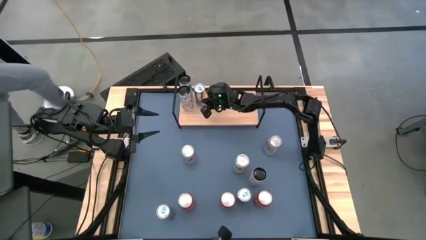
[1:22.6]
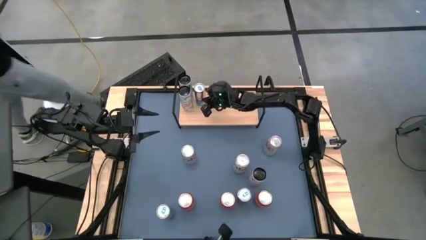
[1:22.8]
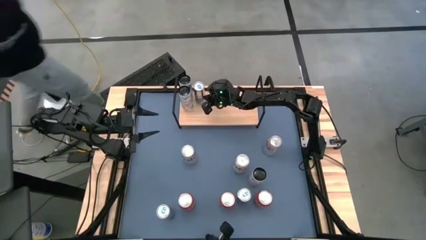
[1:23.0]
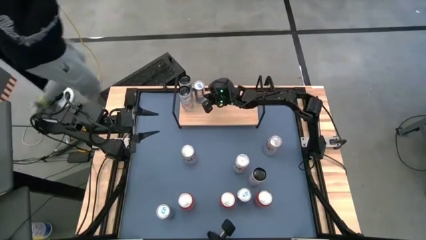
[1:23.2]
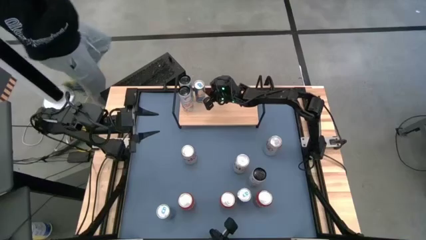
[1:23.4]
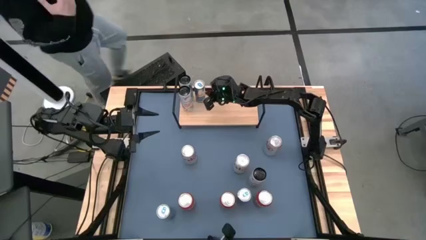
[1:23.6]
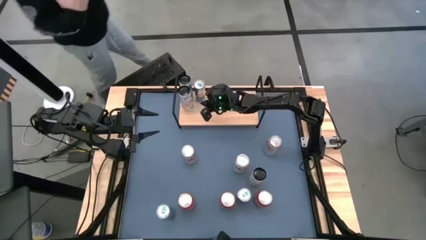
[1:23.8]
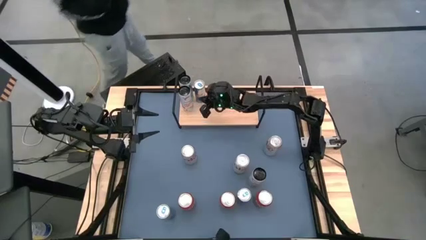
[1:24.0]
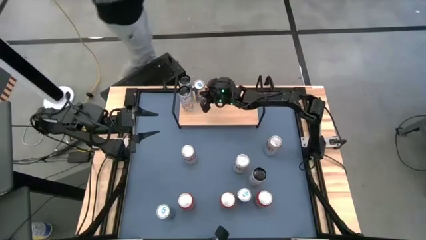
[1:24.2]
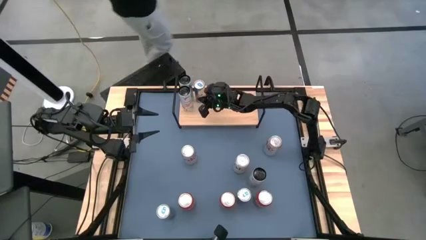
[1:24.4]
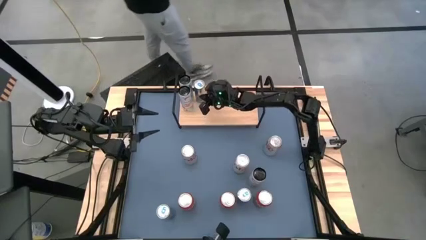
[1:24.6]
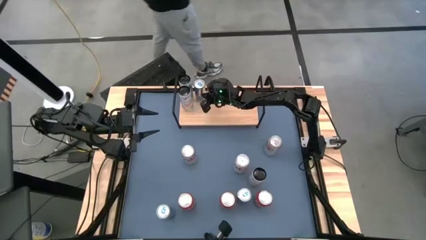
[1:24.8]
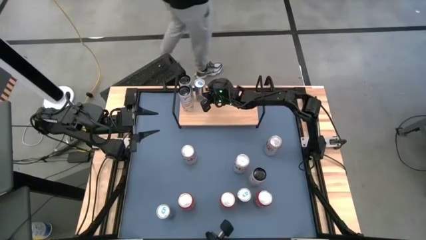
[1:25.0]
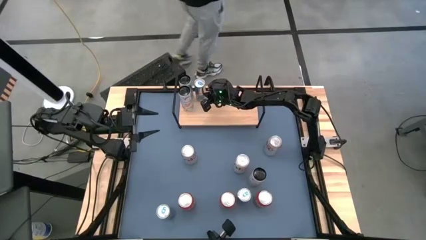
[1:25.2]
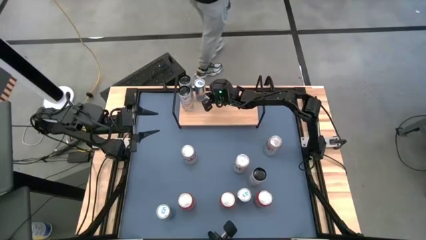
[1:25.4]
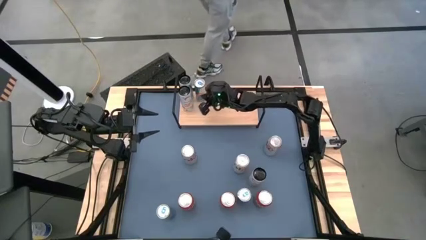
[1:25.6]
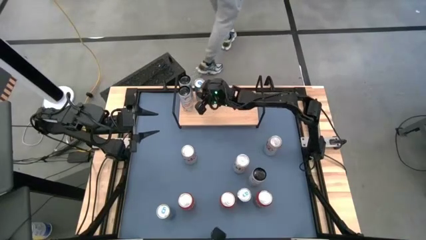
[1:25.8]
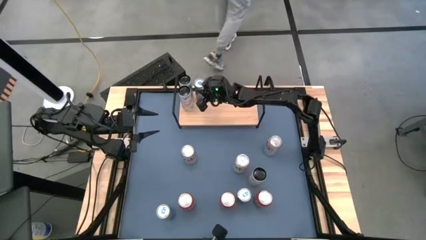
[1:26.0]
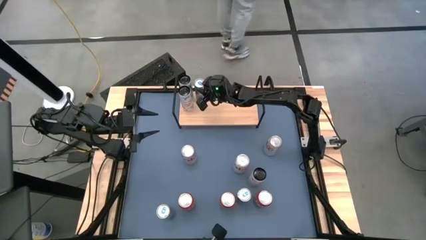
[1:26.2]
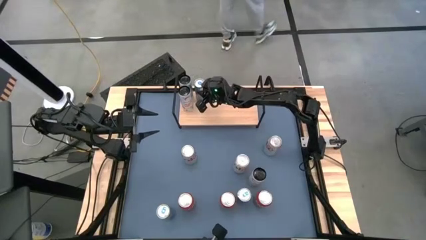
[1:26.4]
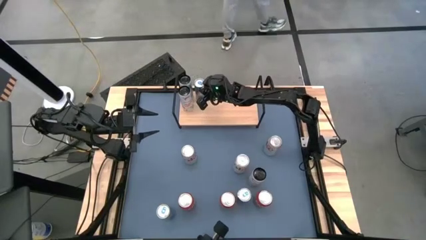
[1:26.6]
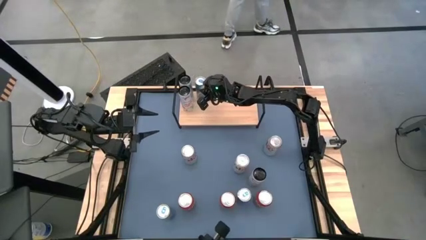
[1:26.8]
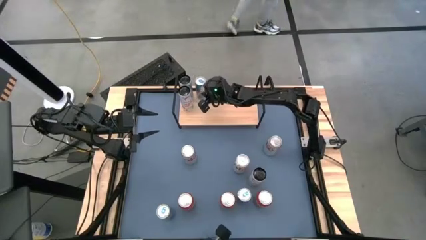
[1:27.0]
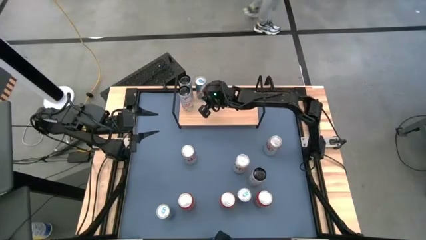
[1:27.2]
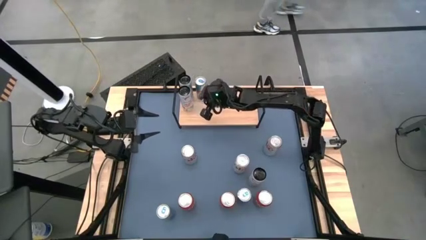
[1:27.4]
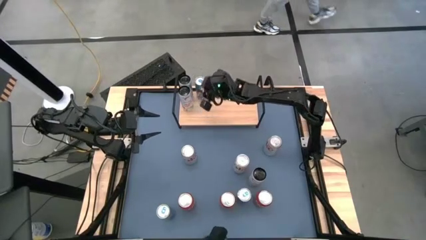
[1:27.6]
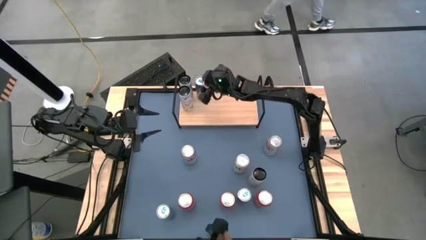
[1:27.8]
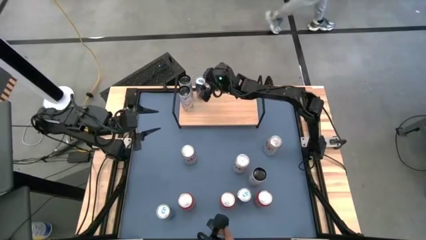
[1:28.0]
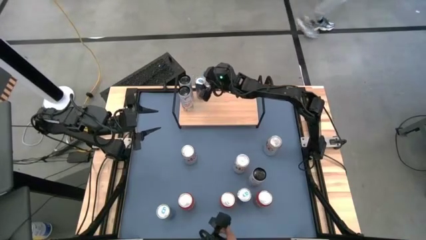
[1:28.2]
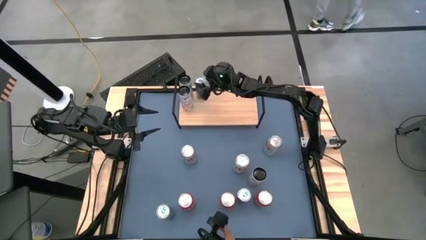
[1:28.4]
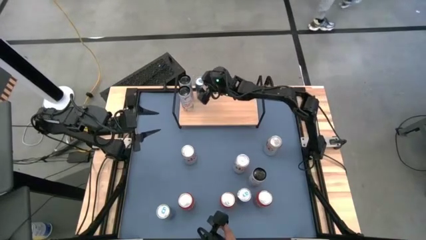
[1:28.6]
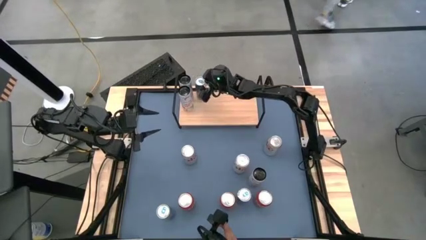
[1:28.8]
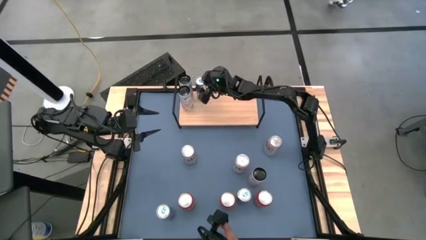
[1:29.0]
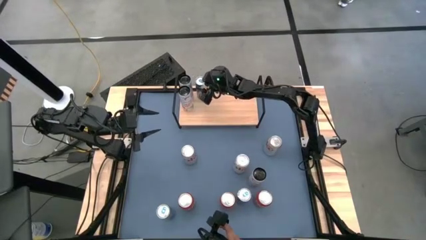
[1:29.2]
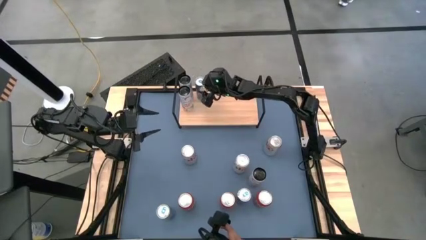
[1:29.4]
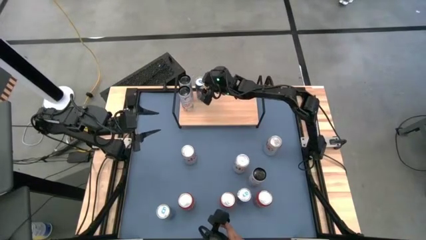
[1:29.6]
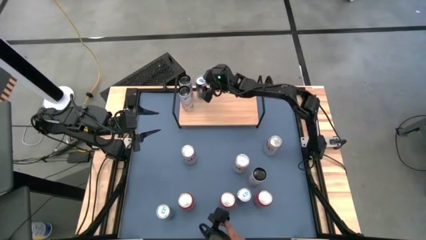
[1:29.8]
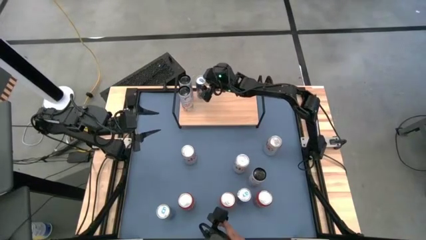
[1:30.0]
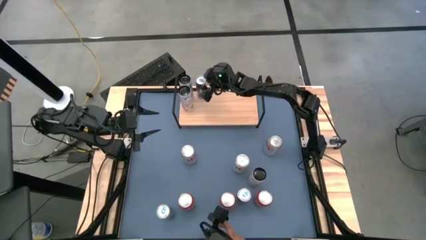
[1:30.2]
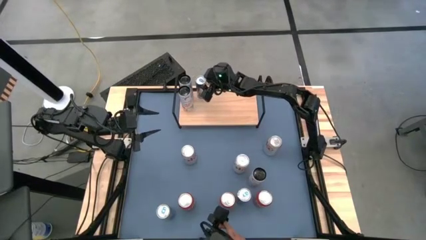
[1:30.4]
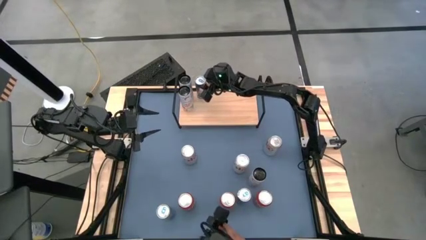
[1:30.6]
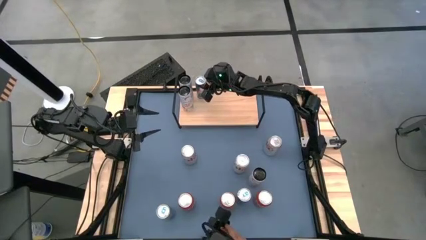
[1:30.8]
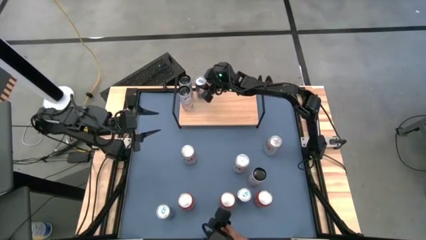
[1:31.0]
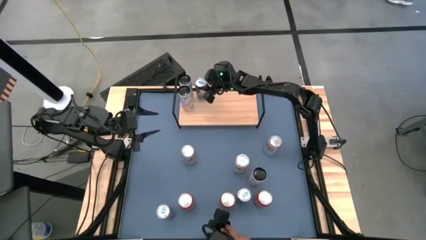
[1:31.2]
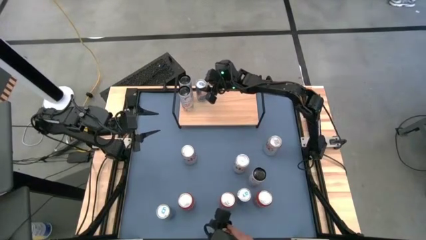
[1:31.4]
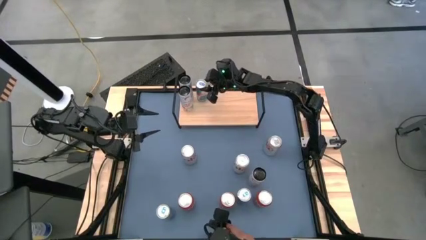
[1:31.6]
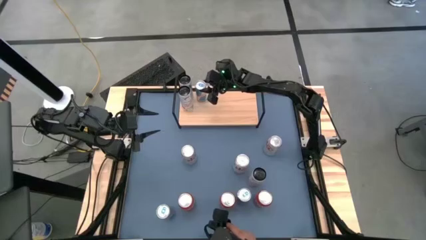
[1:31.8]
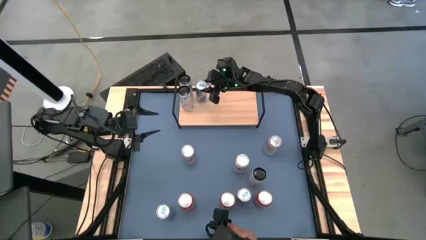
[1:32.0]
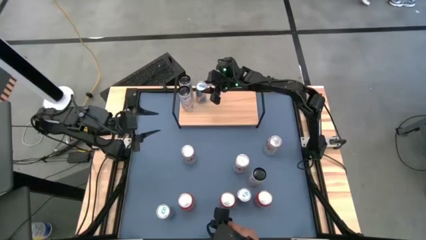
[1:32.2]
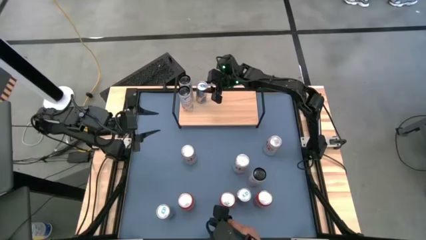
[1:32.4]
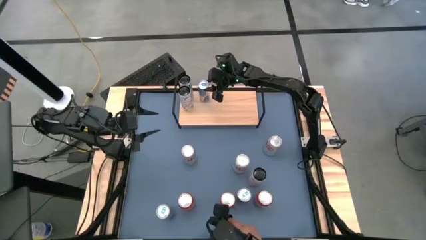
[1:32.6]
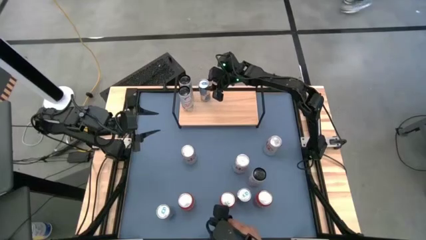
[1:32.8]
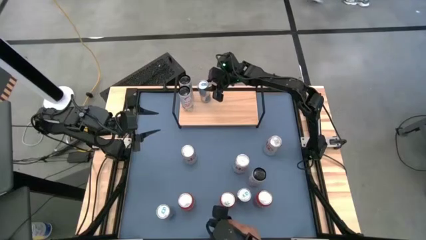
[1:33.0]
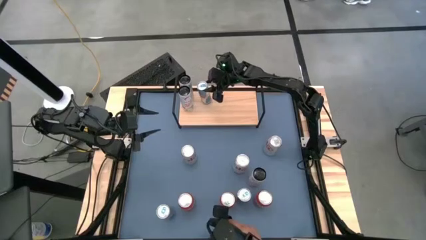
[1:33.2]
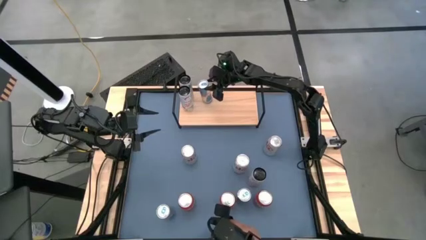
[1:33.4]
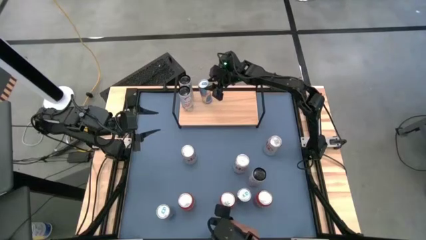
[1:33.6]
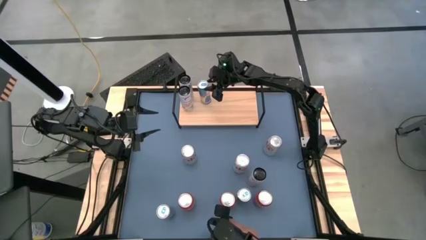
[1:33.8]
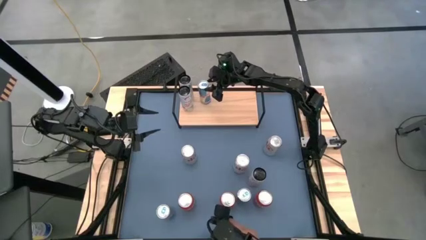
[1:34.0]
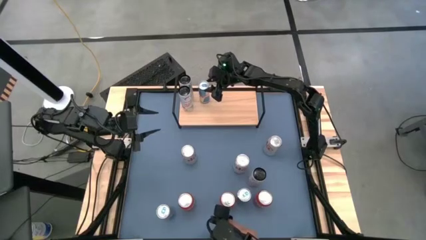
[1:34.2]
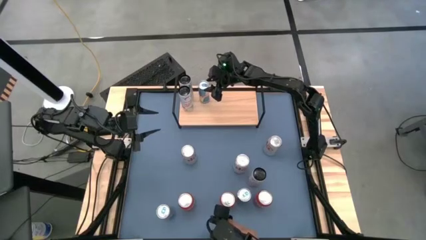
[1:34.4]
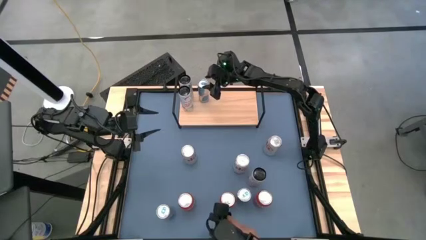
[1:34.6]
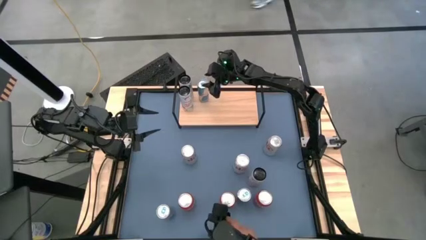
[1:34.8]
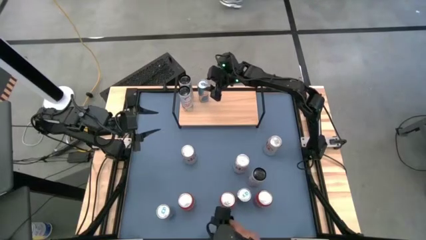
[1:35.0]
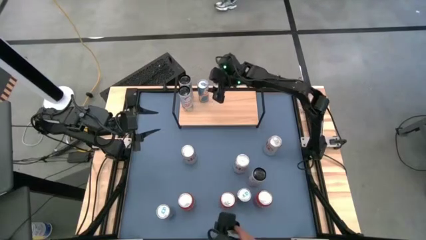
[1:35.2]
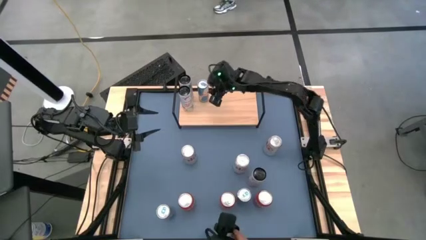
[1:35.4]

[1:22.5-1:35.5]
Task: Place canned beverage on shelf
Put the top blue soda can on the shelf

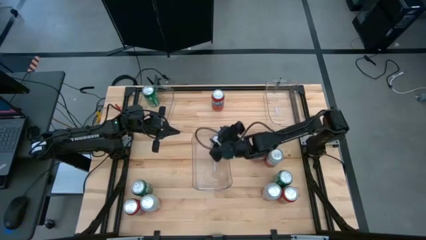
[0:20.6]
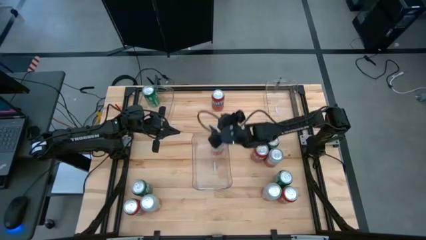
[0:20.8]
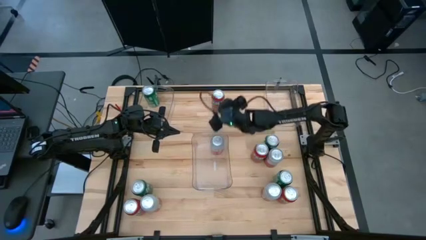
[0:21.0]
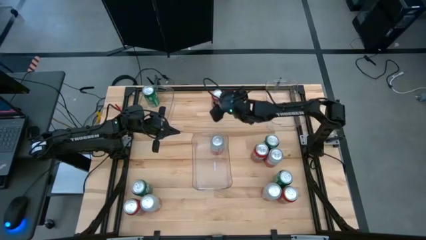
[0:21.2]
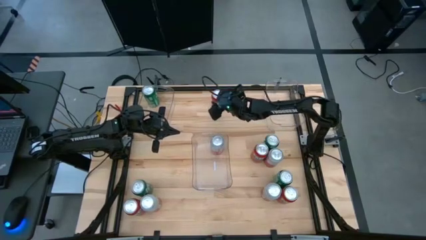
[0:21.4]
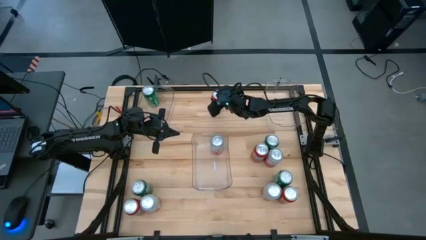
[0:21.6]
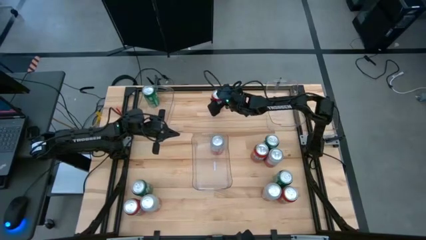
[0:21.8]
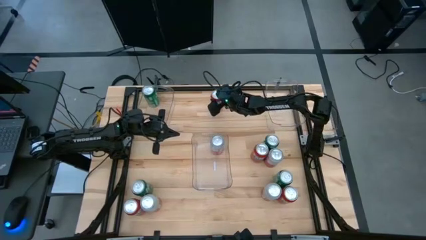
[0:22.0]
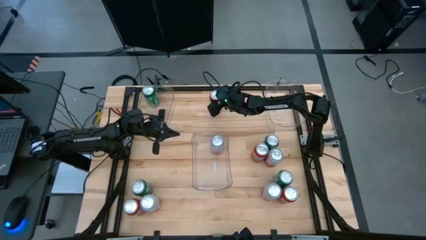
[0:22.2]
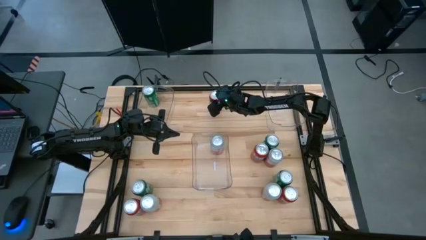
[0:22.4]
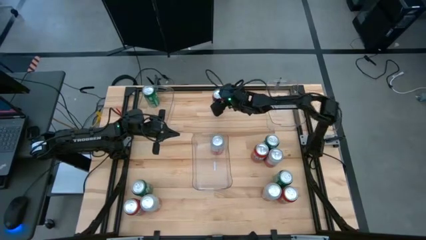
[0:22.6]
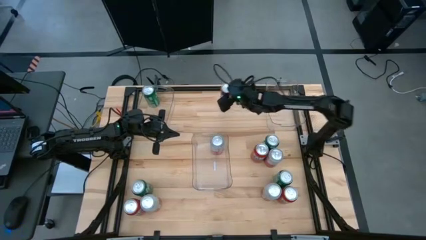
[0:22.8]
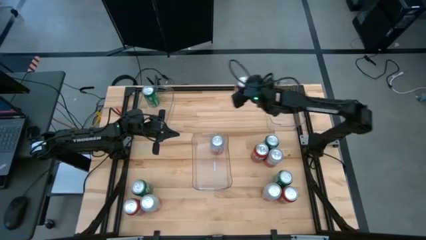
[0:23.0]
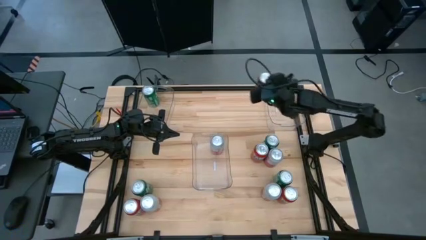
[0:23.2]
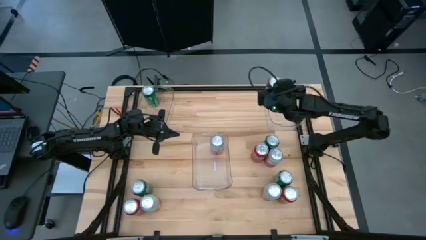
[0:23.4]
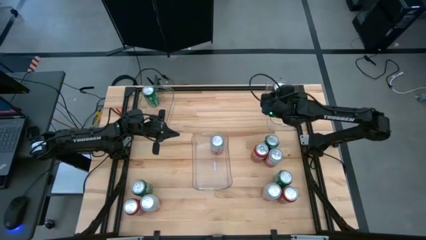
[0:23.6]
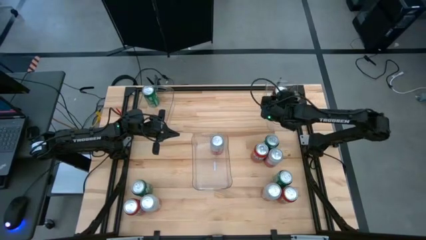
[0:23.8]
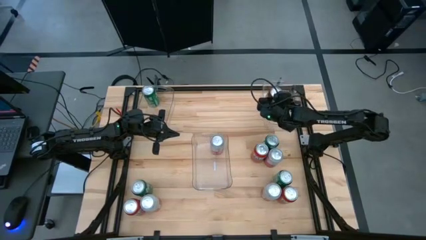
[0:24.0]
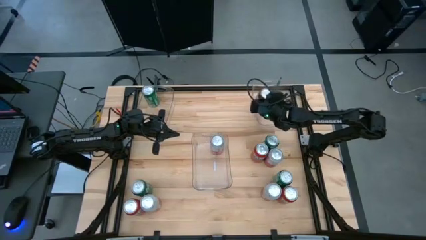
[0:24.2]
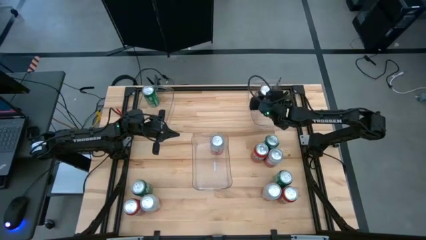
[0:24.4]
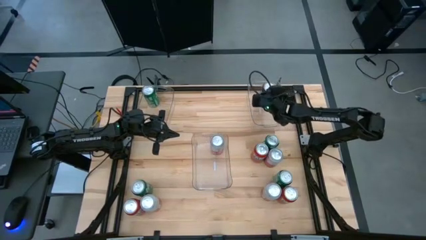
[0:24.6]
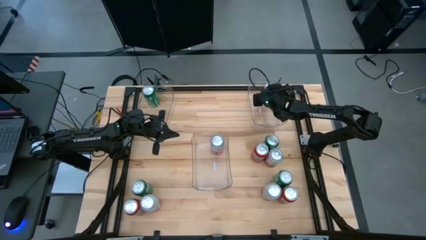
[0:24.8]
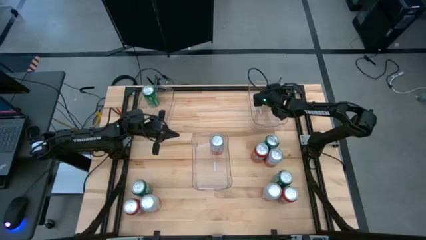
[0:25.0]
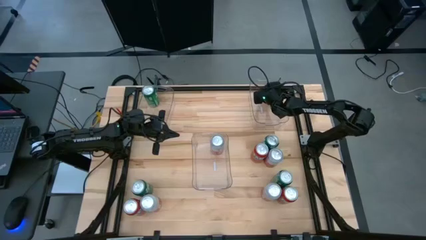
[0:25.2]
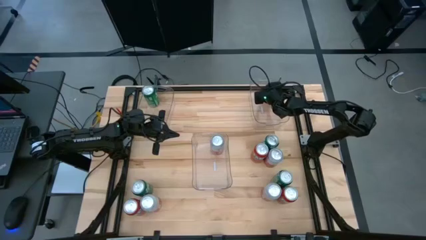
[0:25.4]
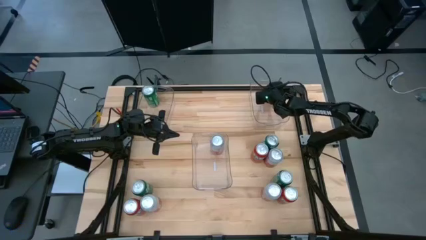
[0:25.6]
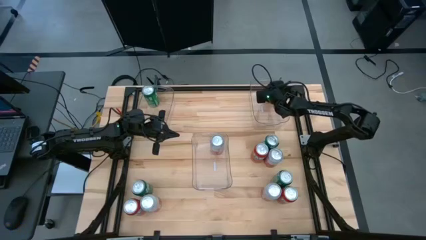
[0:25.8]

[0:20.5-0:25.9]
Task: Sort soda cans
Put the red soda can into the right top transparent bin
